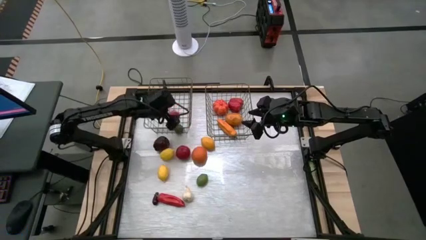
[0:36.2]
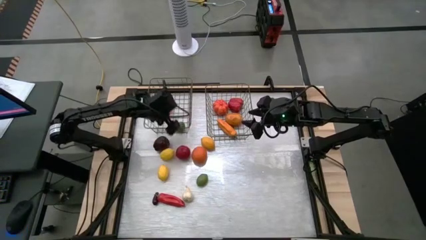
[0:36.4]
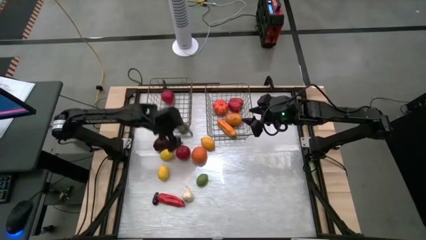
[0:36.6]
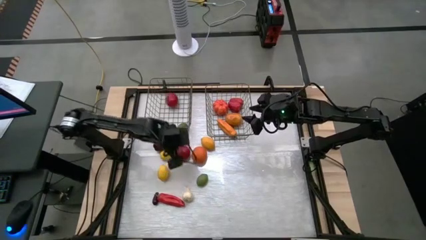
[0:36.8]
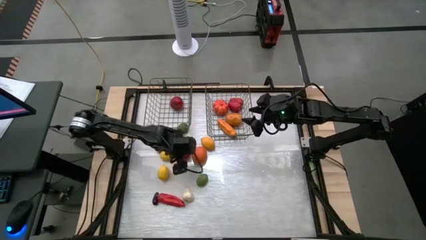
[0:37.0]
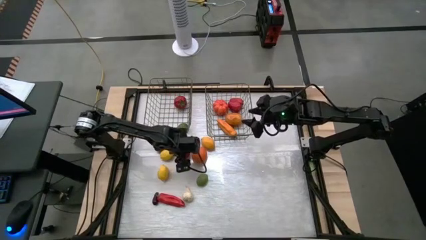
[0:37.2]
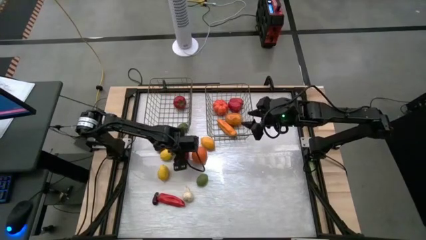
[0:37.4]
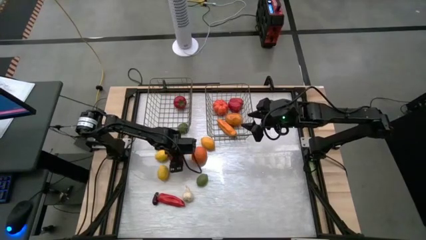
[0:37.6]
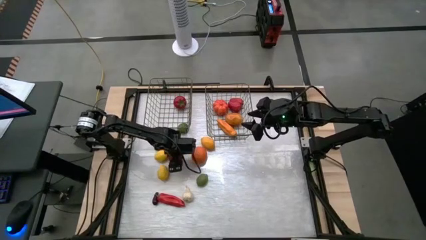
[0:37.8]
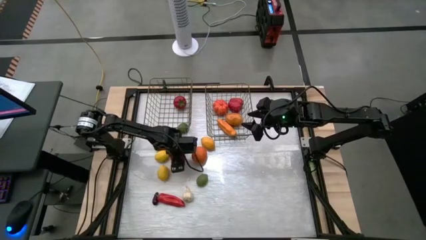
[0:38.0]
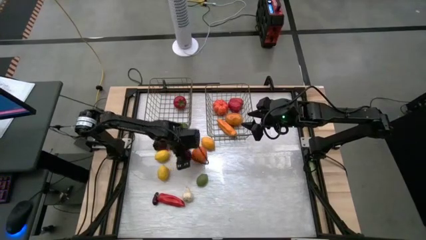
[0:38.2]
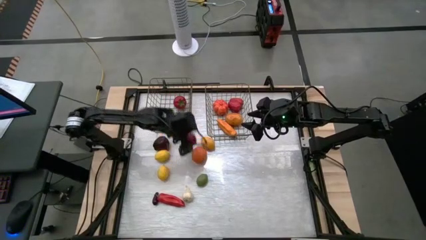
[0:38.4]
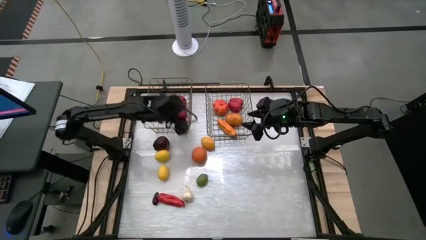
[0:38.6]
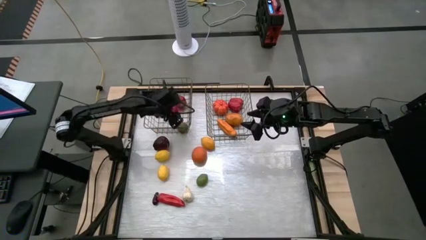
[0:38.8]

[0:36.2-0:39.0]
Task: Sort produce into baskets
Put the tomato into the left wire basket

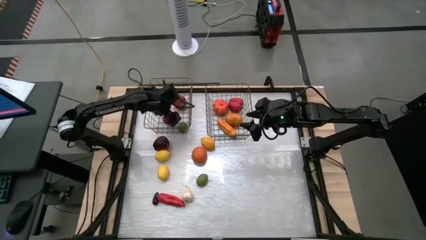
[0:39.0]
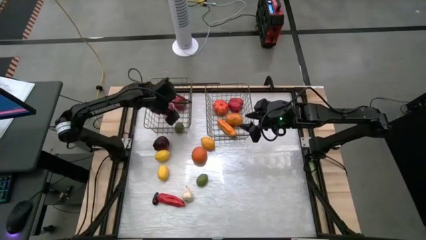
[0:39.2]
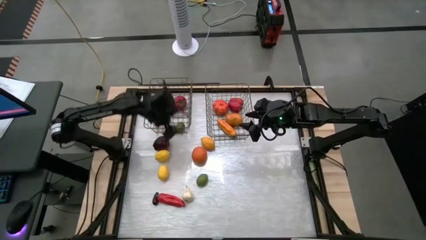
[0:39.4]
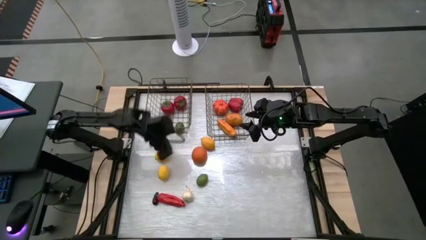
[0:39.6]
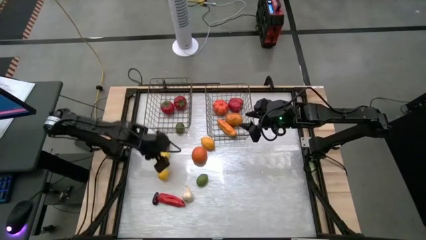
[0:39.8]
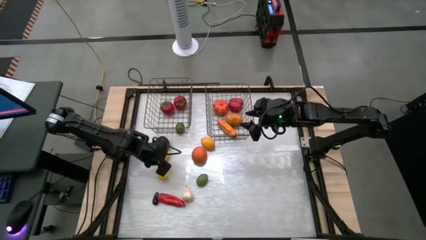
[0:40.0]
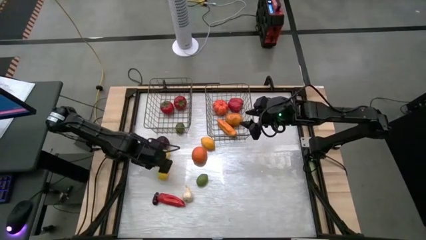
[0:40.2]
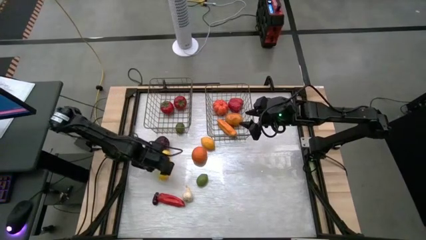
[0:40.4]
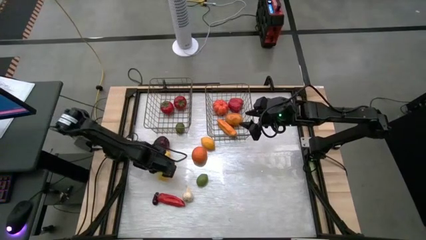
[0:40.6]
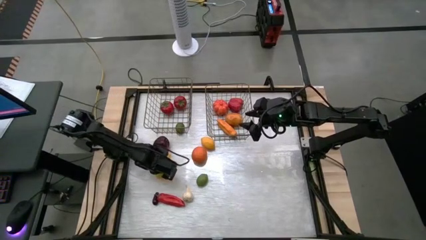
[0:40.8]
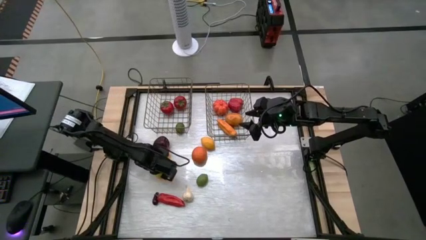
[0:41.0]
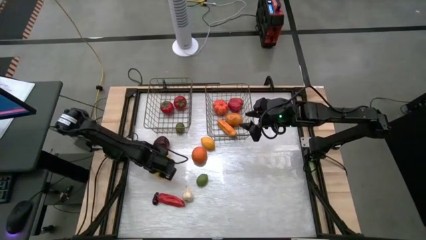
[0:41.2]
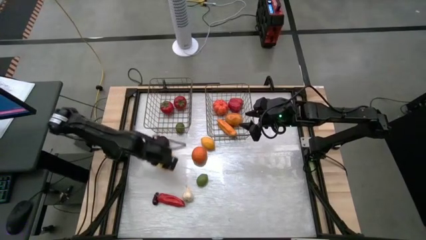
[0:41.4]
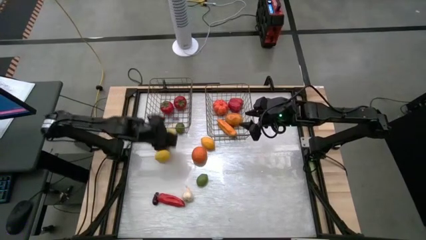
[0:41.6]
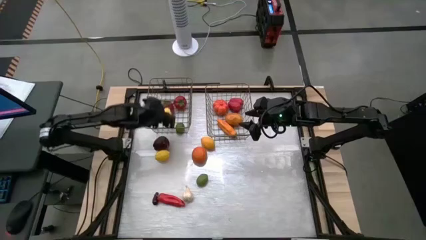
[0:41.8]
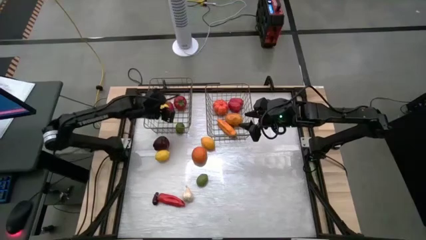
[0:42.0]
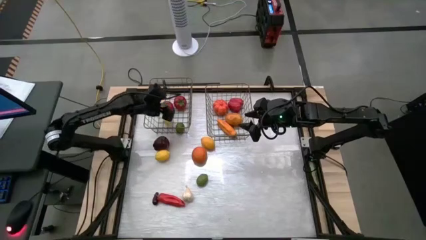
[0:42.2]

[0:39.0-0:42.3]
Put the bottom lemon into the left wire basket

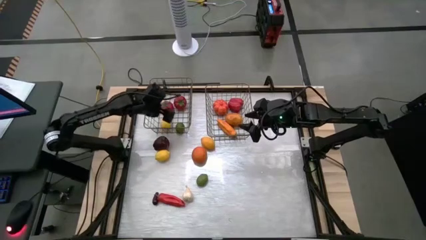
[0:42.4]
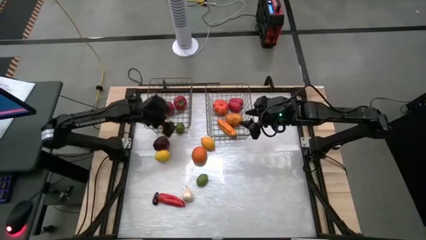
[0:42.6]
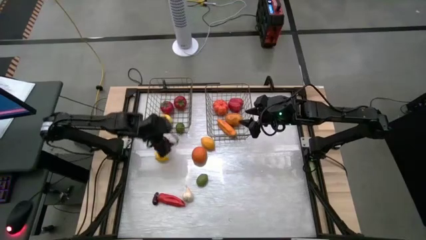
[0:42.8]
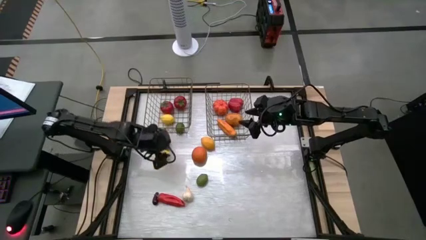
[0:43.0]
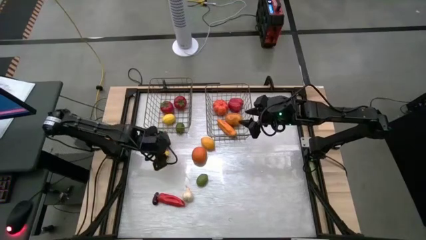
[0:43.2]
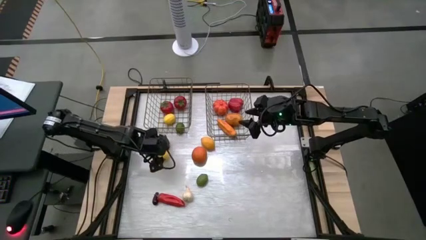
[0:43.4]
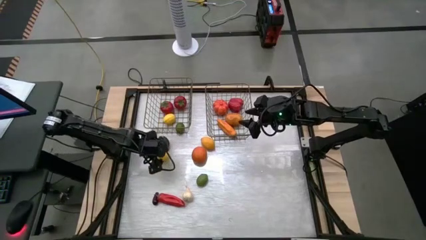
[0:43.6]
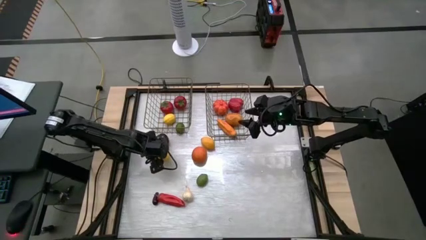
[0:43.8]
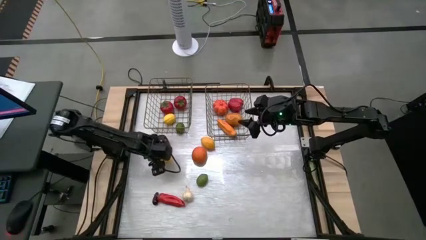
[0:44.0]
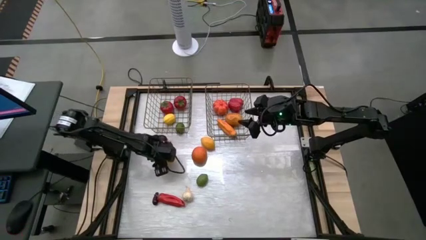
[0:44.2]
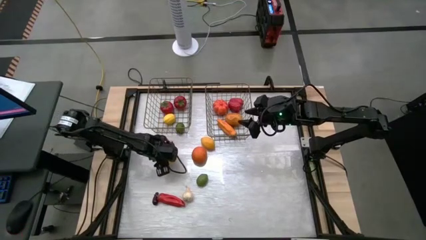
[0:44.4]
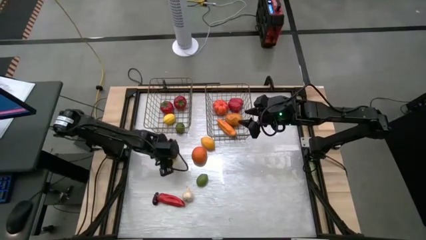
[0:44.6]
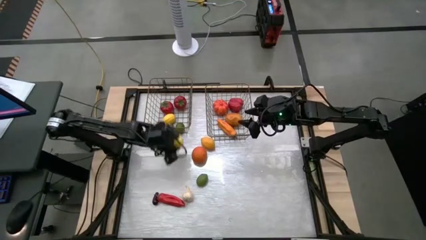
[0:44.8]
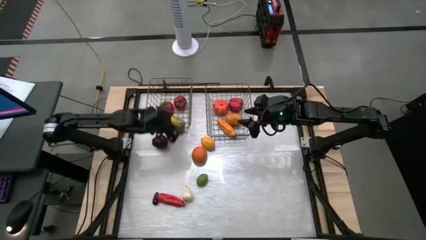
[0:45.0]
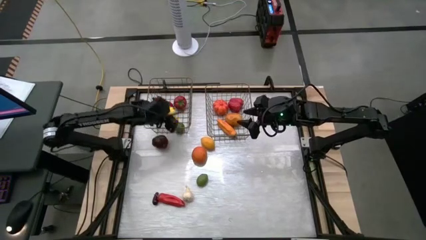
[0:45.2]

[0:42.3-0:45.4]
Put the left lemon into the left wire basket

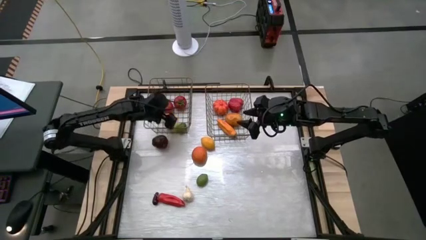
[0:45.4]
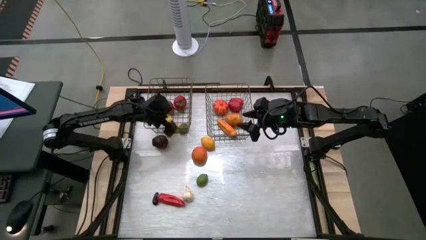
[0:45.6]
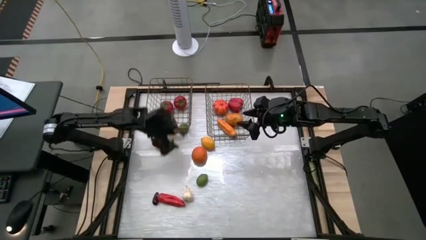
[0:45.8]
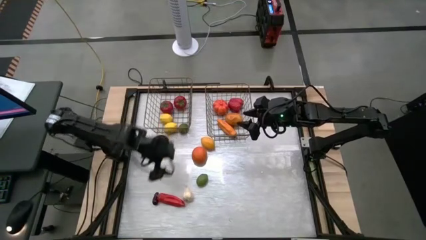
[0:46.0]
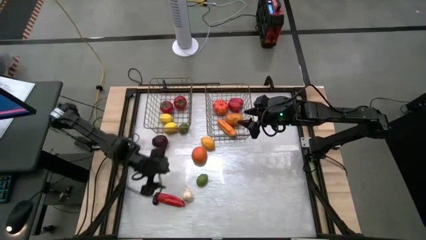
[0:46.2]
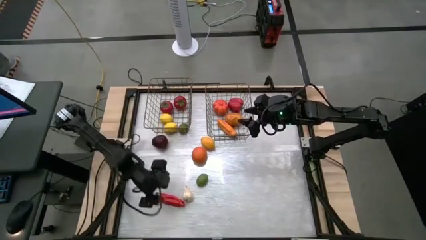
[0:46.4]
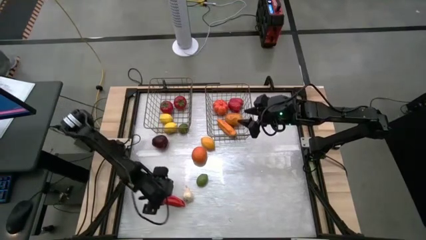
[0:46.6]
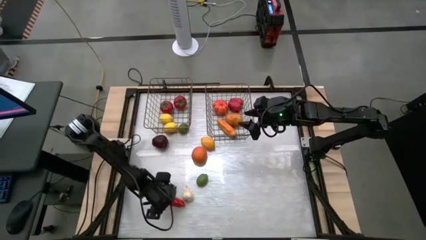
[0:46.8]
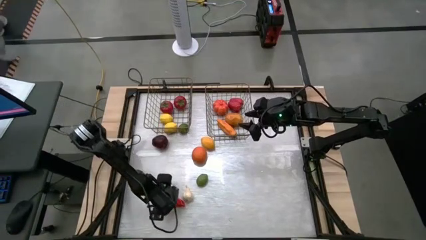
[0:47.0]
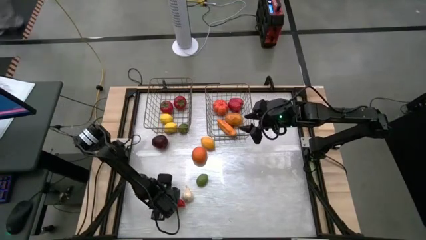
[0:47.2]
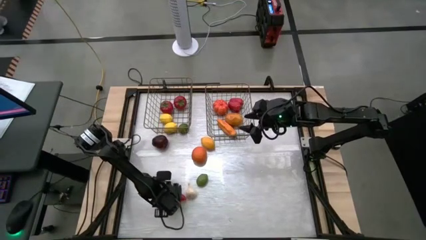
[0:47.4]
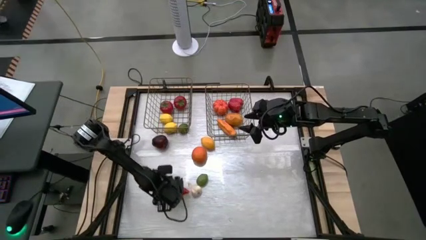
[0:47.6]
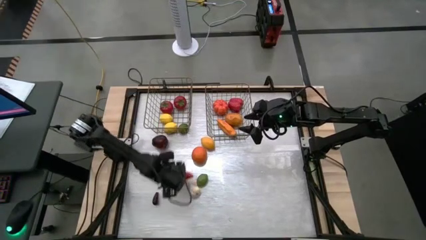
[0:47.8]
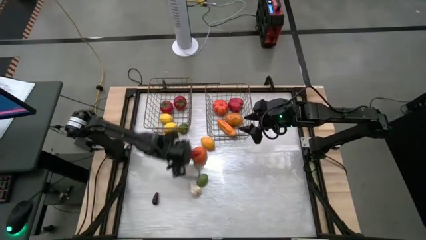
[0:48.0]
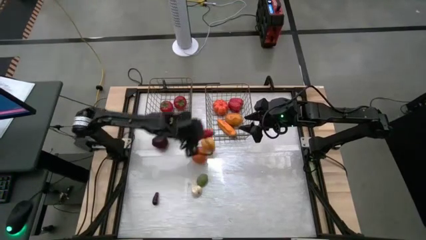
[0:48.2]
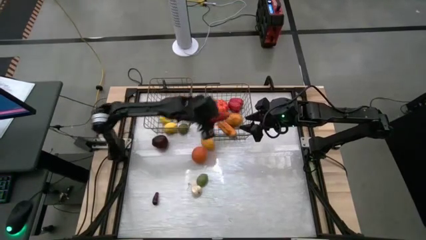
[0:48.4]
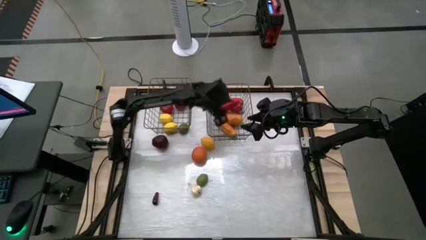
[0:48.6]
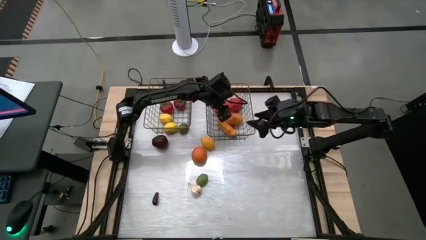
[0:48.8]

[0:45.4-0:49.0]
Put the red chili pepper into the right wire basket

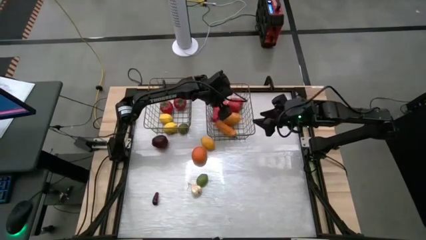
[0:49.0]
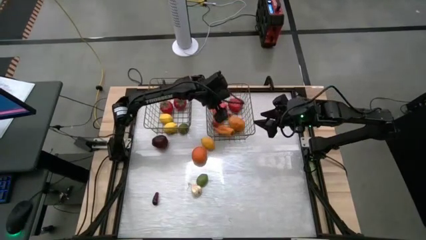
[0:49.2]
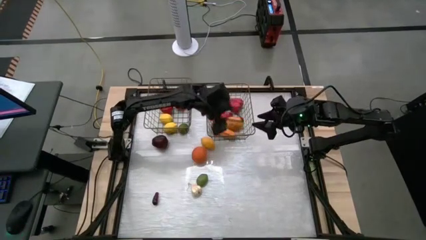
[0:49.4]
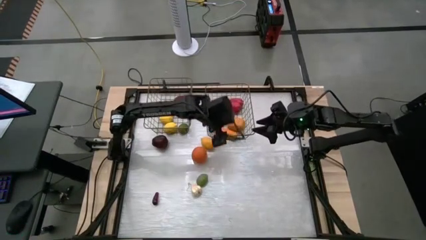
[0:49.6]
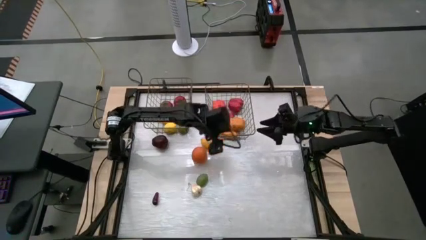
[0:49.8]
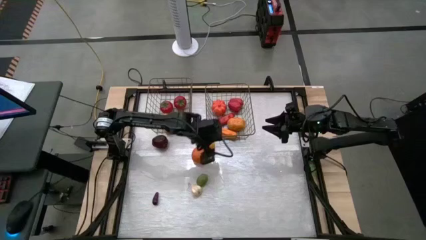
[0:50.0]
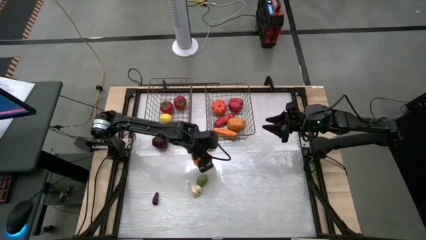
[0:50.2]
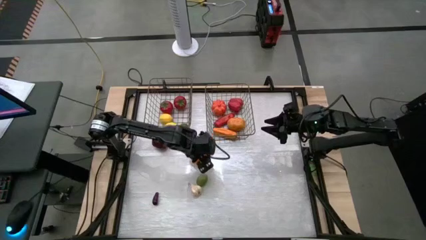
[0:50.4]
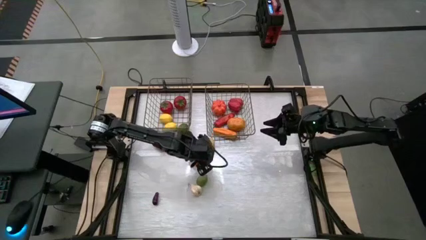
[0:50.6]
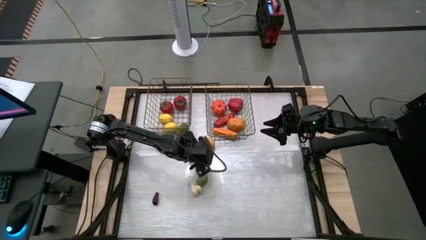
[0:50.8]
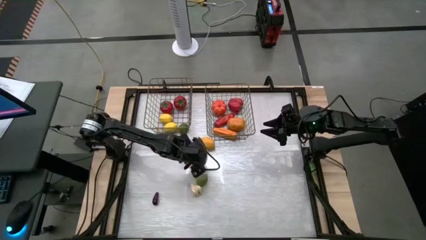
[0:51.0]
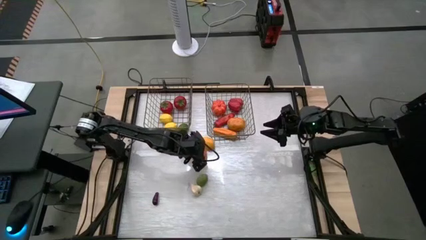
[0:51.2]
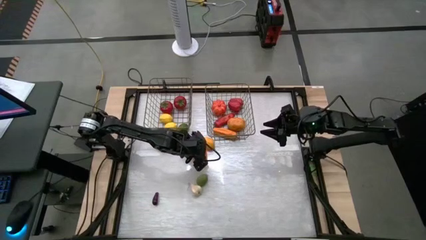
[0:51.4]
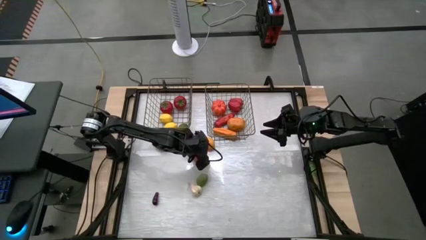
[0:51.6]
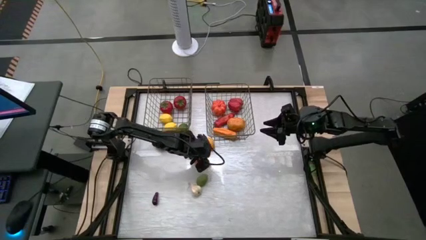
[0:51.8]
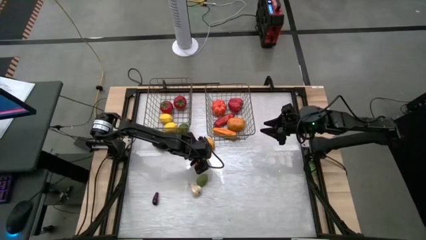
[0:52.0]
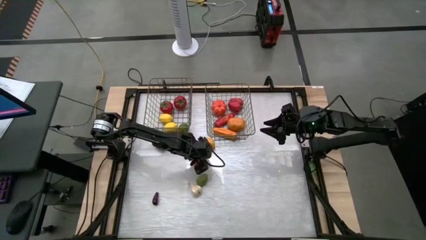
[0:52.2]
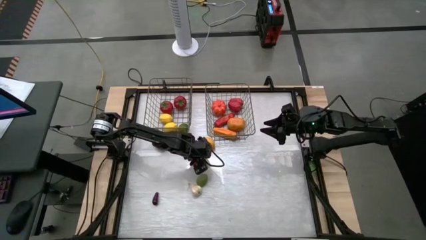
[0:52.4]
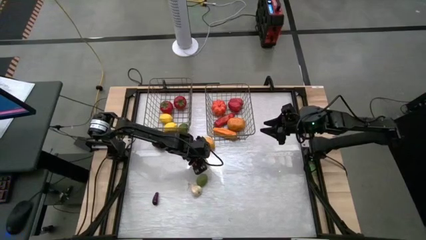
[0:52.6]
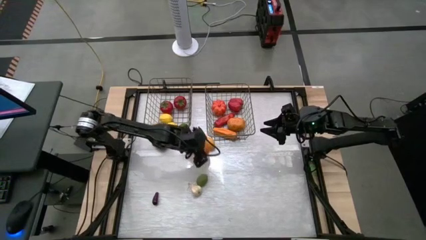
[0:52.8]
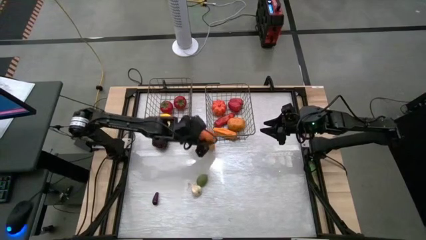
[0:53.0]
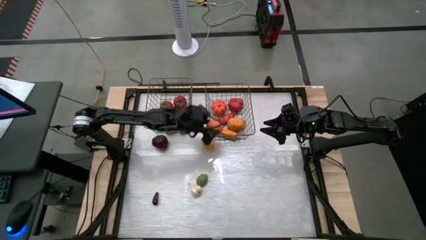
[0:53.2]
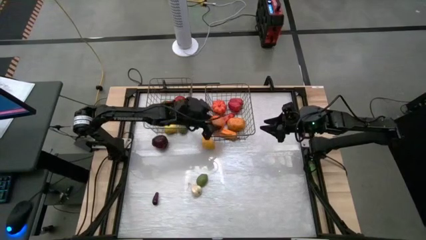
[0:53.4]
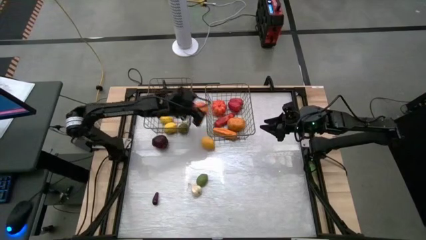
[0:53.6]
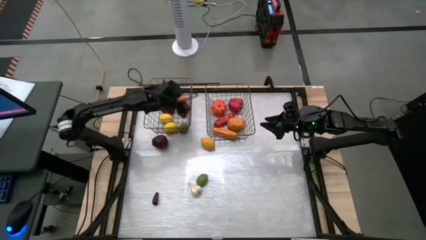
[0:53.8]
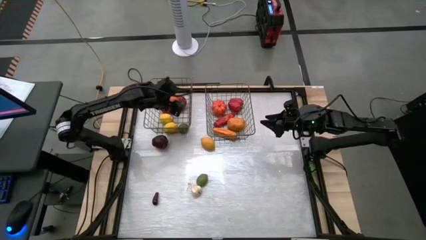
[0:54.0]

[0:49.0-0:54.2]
Put the orange into the left wire basket
